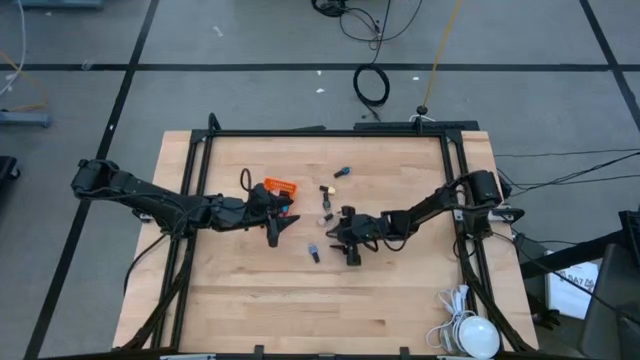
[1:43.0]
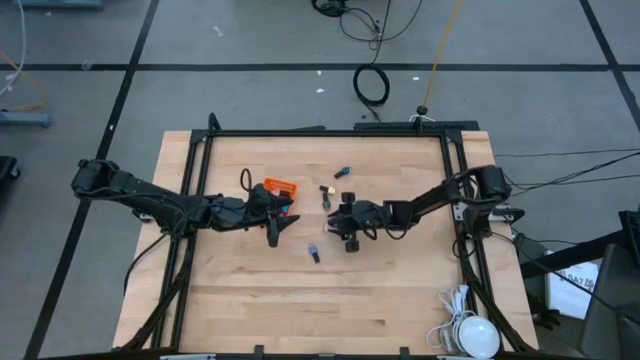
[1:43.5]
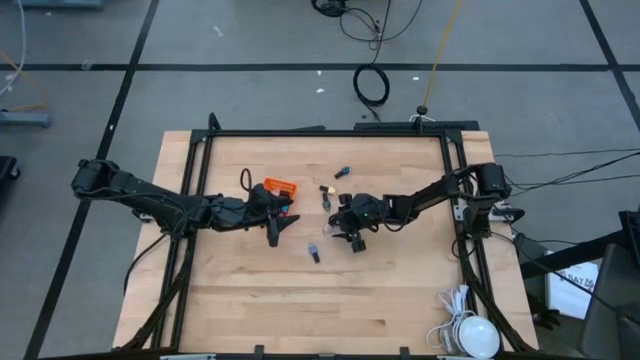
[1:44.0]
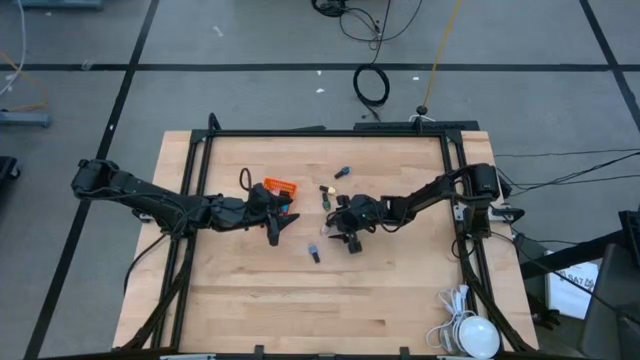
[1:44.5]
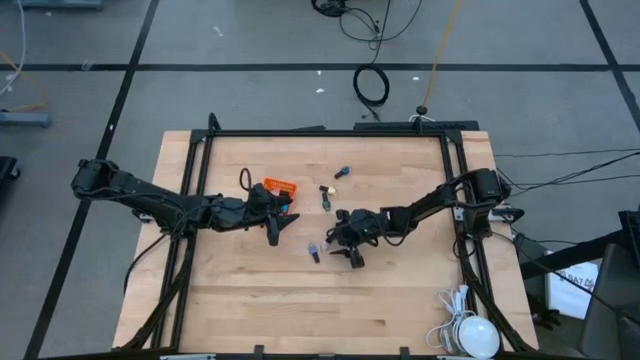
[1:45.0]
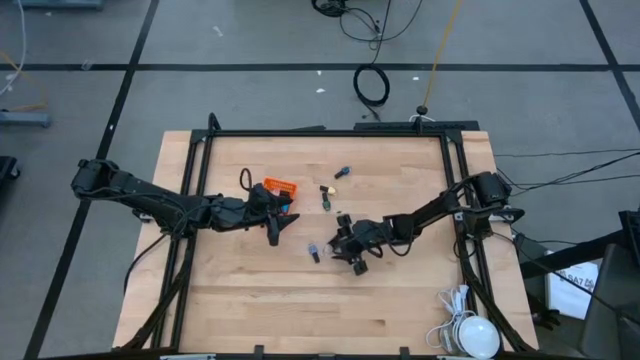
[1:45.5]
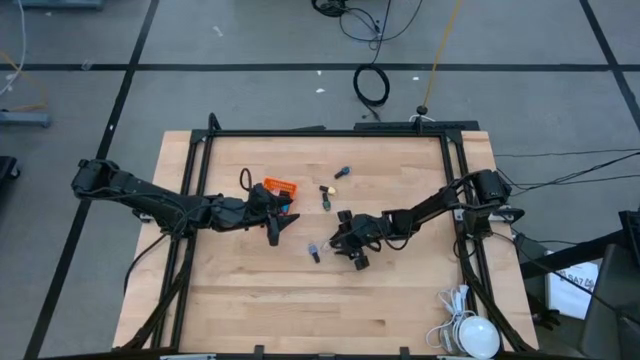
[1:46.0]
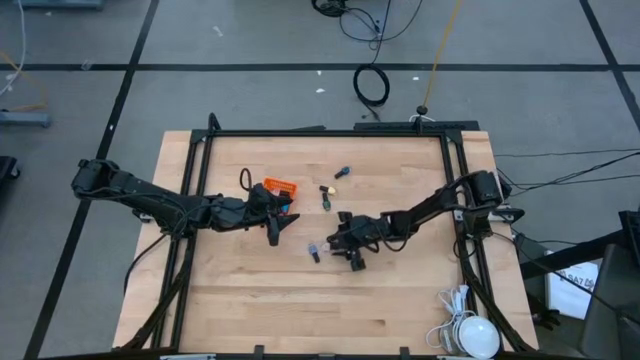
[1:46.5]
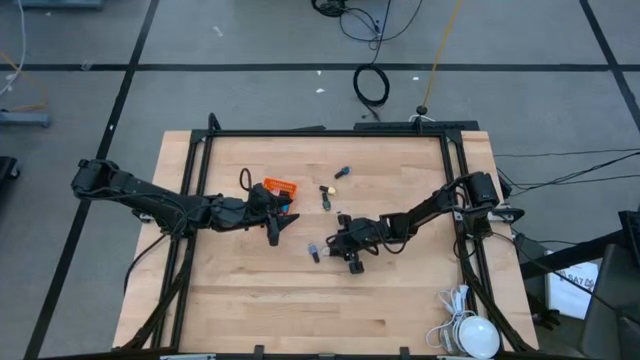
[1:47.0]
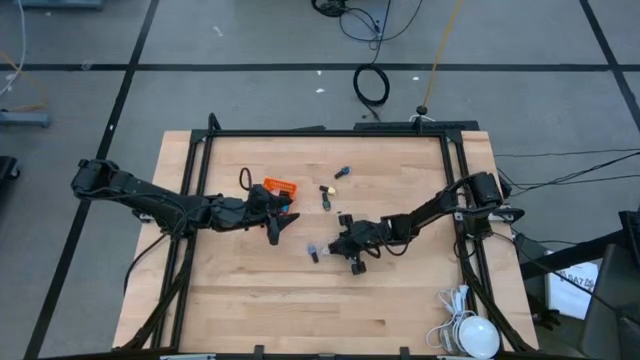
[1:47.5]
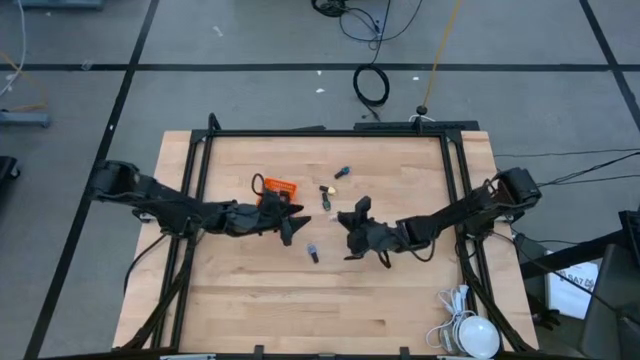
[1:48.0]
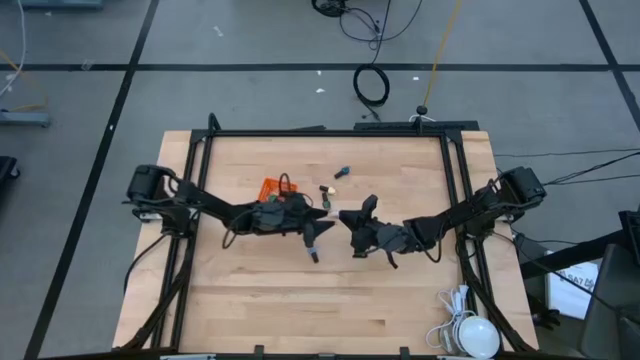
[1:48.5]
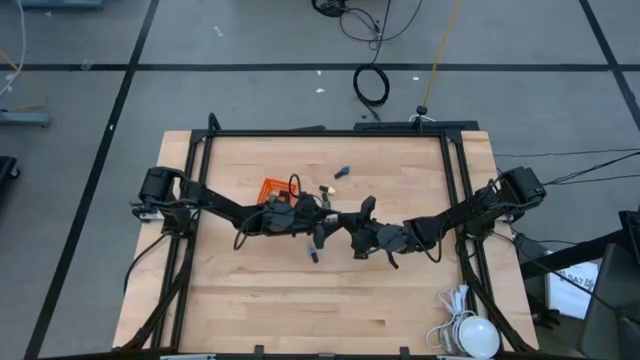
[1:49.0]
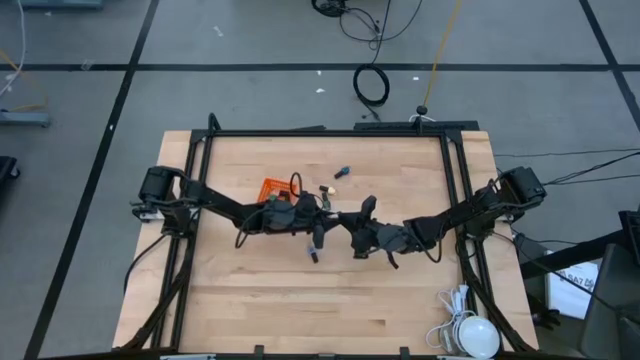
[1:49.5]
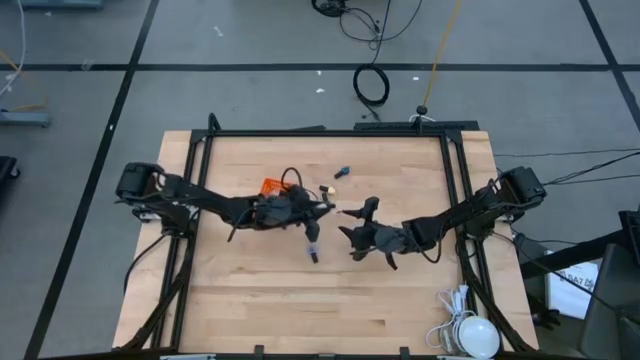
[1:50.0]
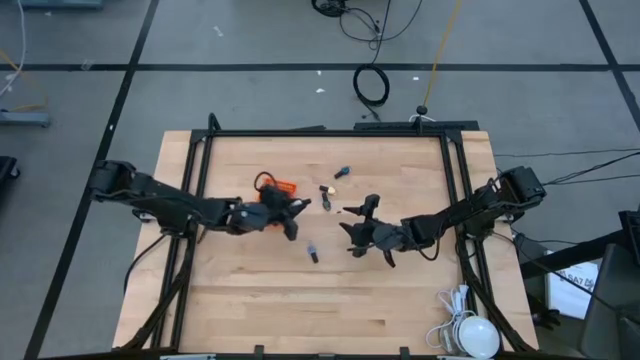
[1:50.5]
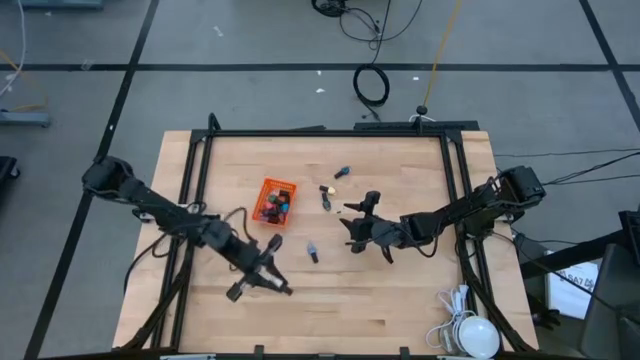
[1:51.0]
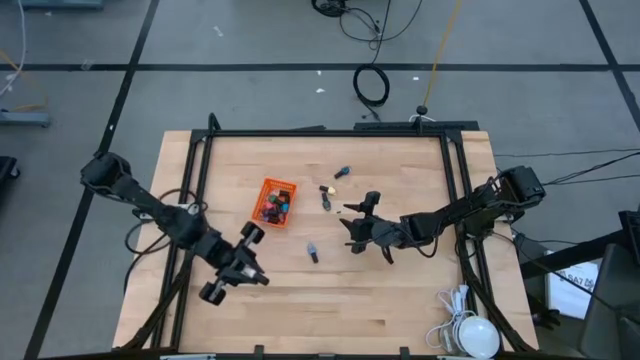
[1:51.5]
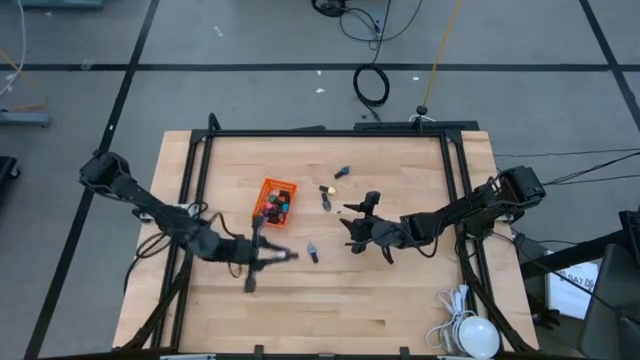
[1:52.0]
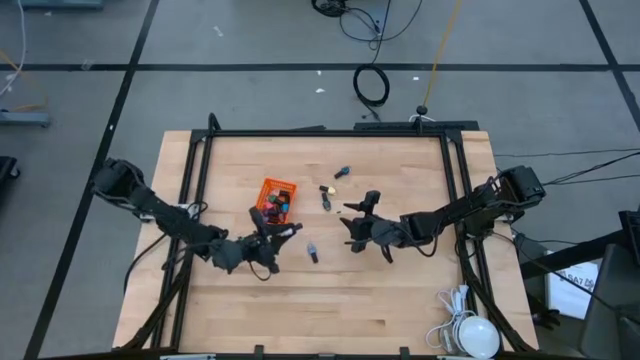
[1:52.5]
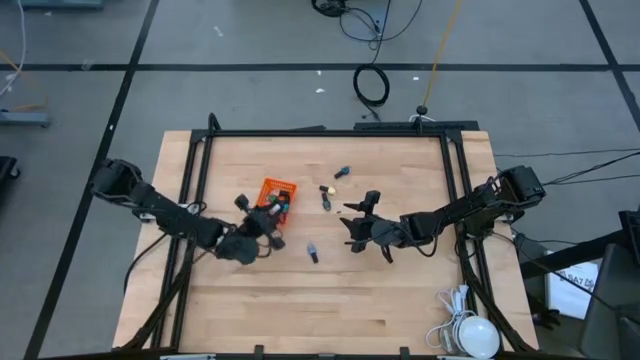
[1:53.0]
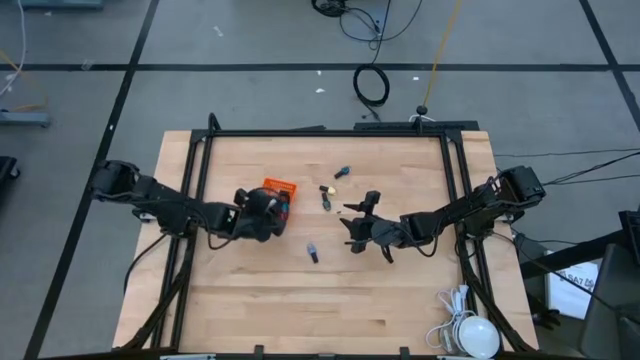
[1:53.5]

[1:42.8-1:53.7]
Task: Pick & Place Nail Polish
Put the brown nail polish into the orange basket

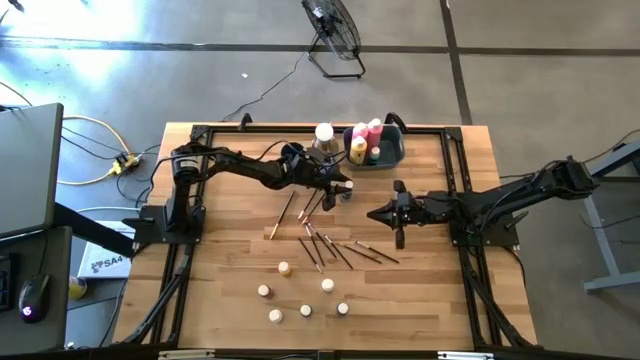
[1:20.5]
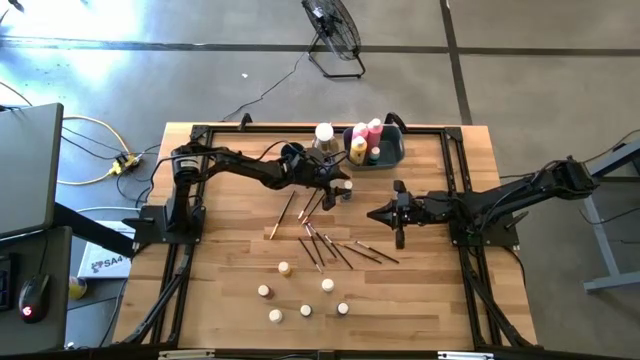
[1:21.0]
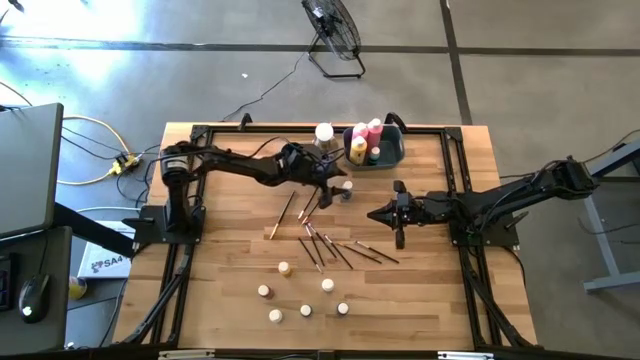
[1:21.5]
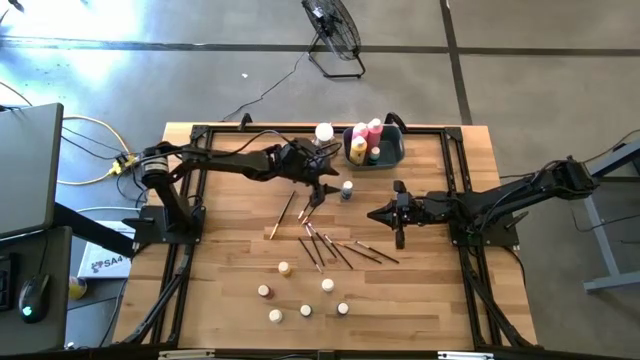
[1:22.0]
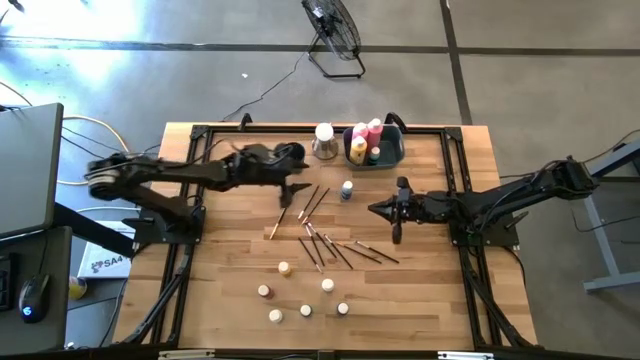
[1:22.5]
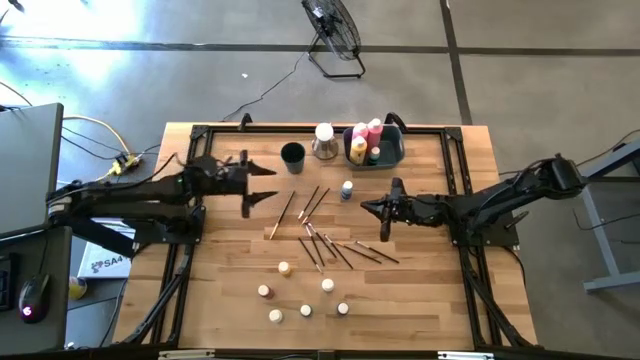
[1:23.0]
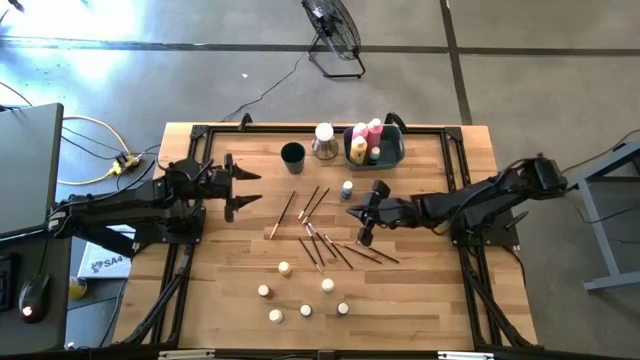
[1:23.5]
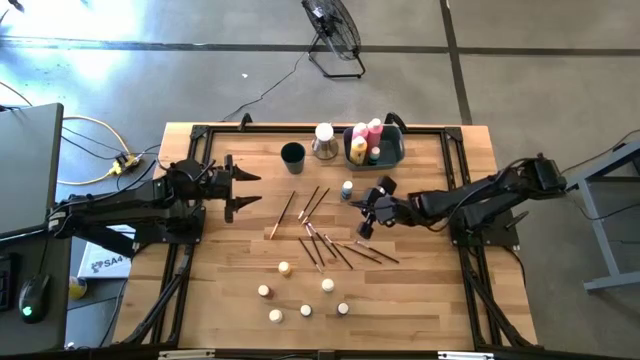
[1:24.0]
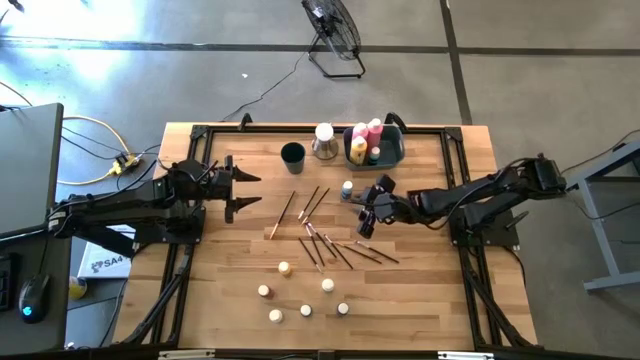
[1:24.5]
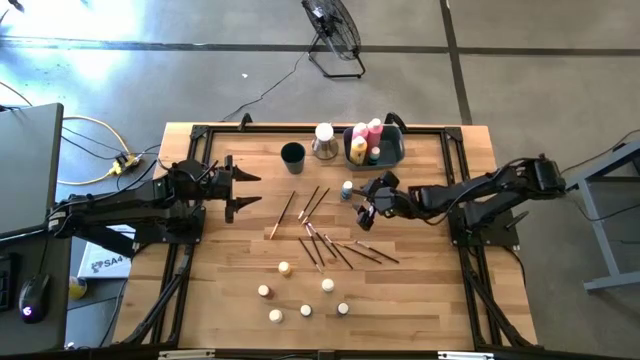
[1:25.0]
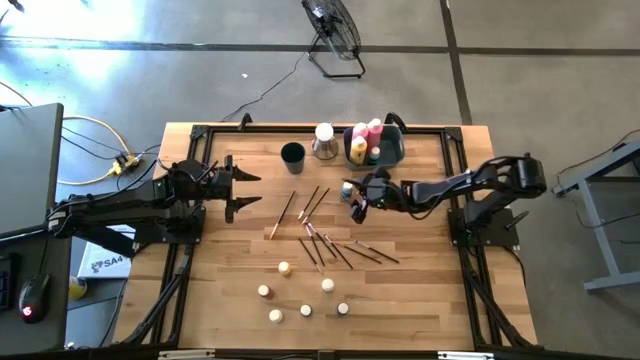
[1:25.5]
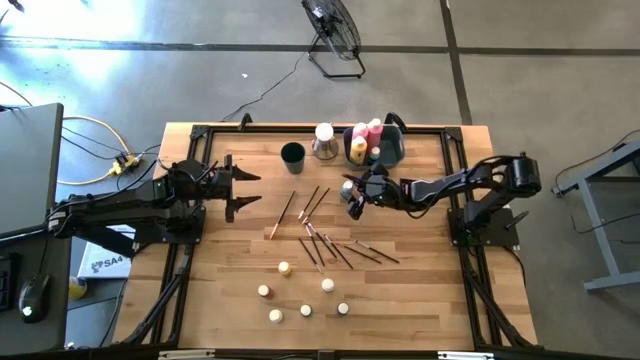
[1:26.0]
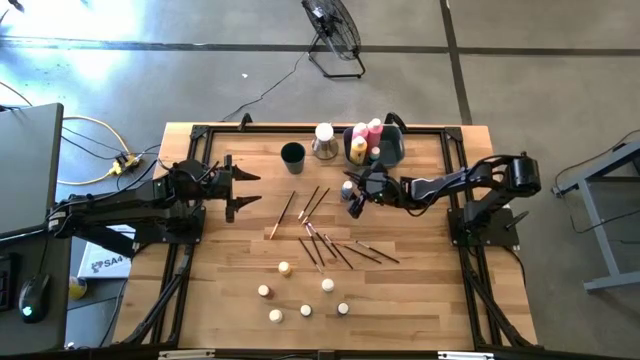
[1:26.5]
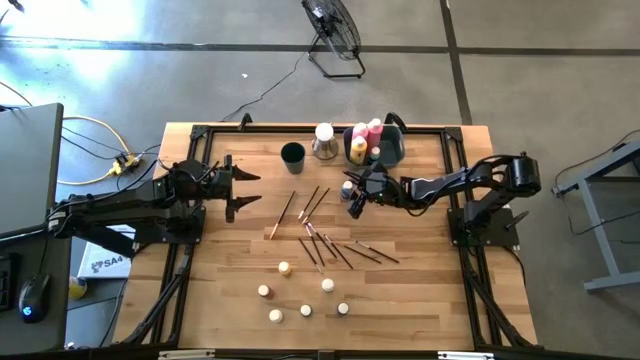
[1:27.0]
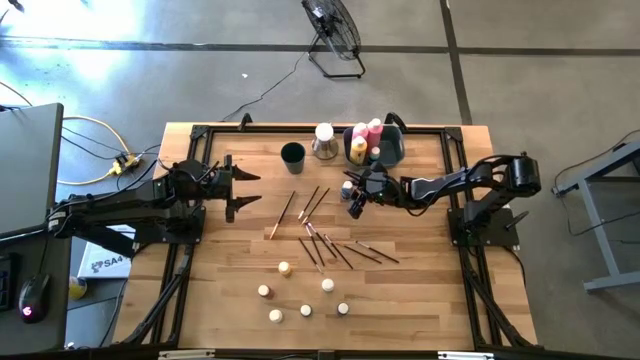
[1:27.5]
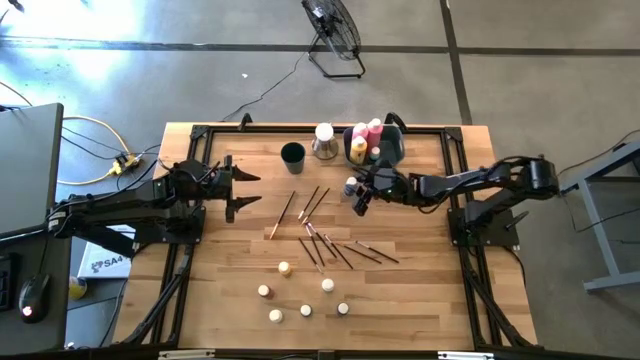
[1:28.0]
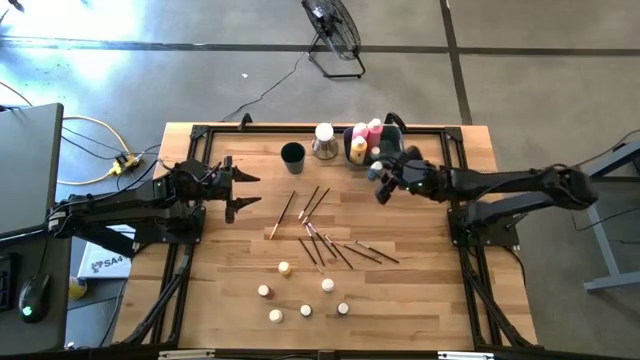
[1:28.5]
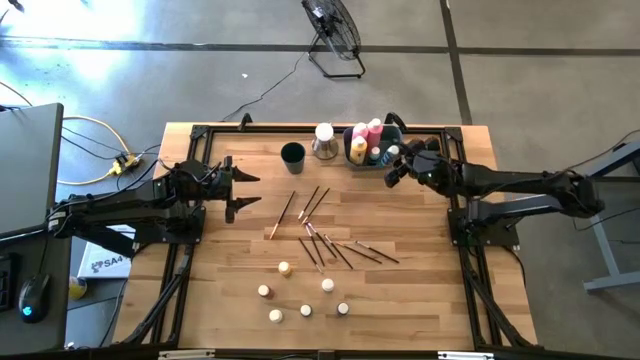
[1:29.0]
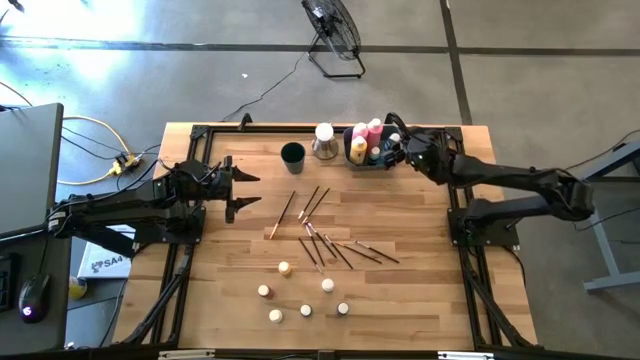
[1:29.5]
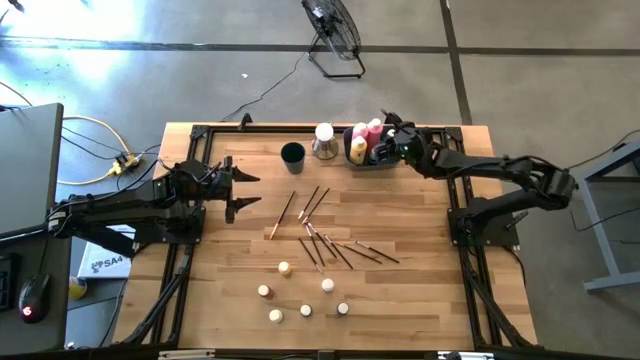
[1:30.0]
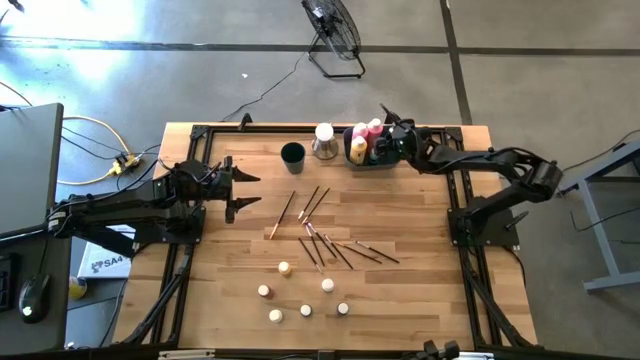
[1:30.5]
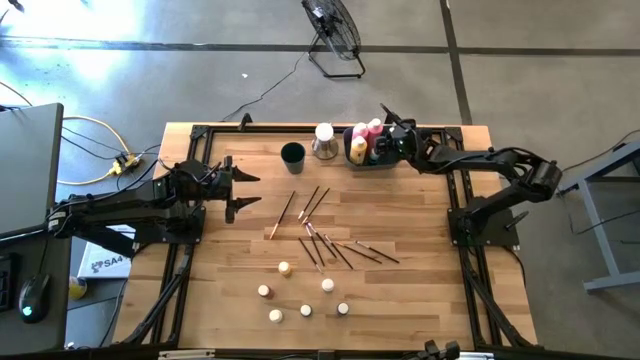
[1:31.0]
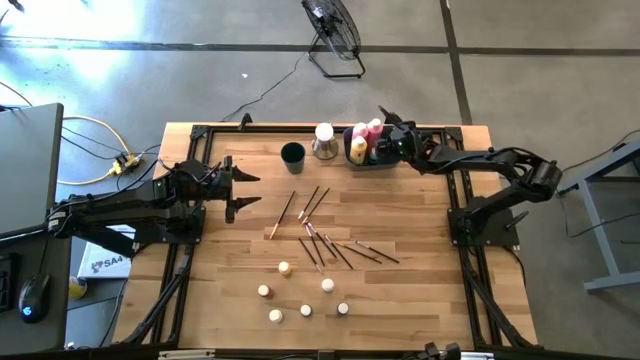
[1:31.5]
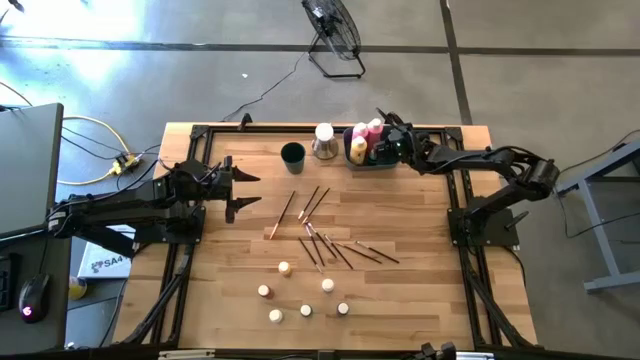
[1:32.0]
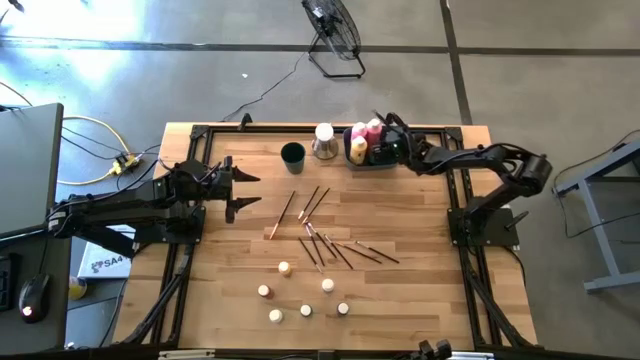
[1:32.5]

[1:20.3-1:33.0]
Task: Pick & Place Paint Supplies
Put the small light blue paint bottle into the blue bin
